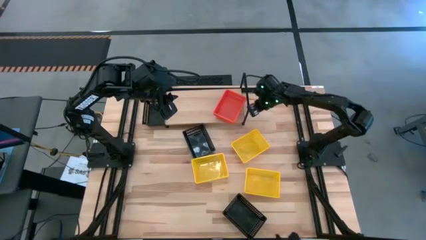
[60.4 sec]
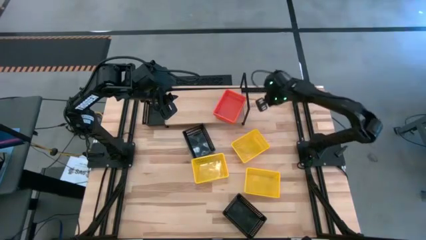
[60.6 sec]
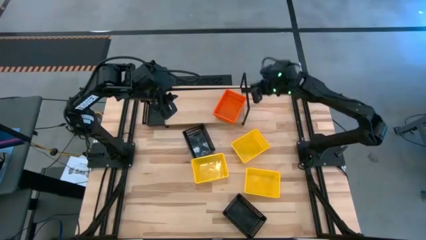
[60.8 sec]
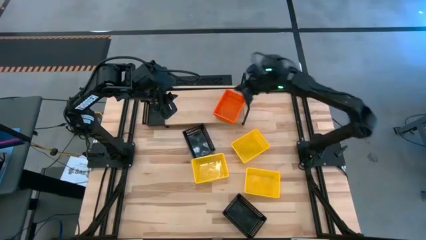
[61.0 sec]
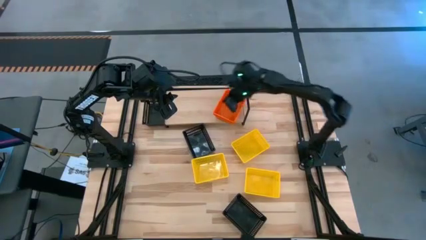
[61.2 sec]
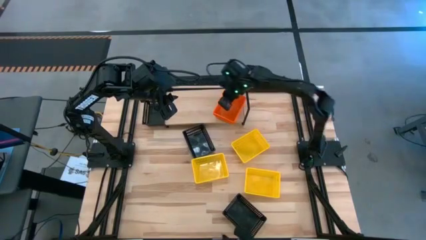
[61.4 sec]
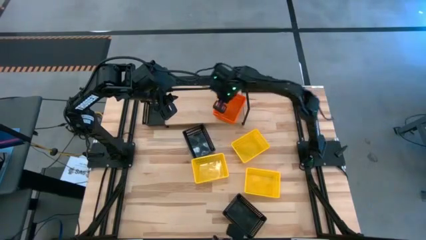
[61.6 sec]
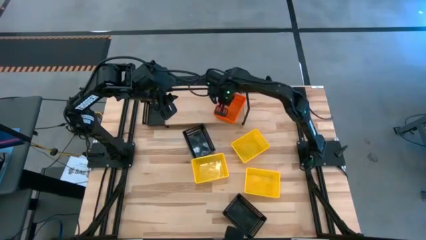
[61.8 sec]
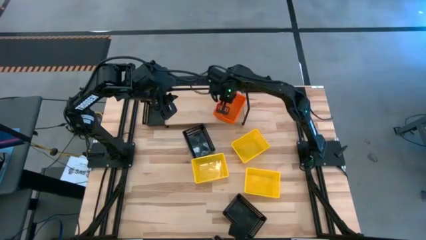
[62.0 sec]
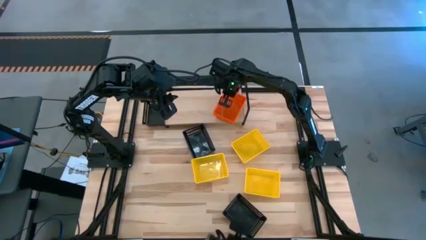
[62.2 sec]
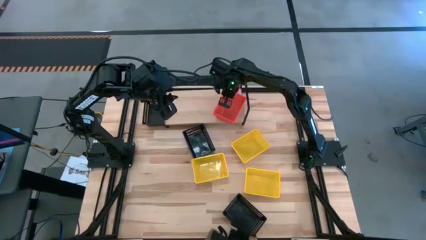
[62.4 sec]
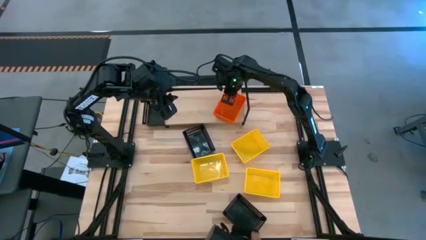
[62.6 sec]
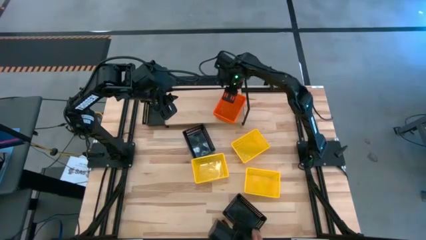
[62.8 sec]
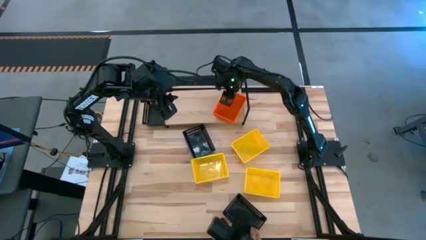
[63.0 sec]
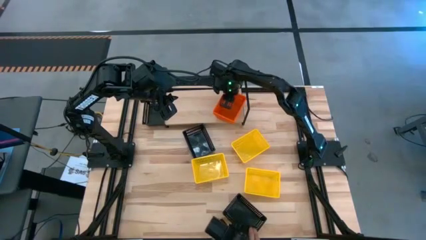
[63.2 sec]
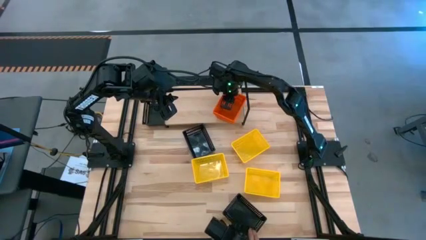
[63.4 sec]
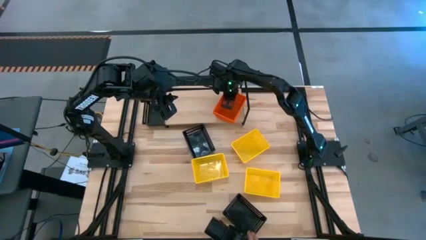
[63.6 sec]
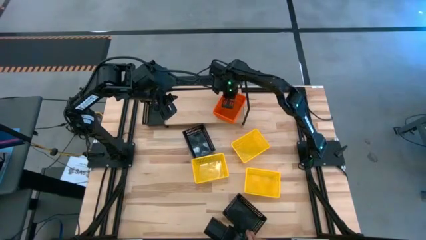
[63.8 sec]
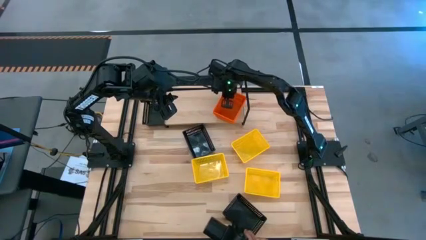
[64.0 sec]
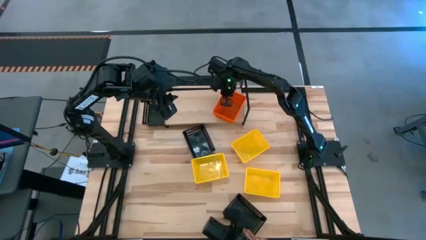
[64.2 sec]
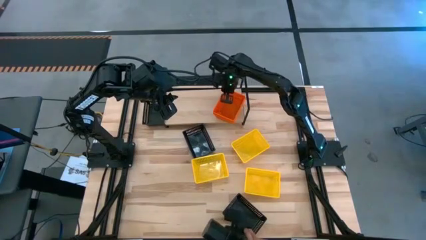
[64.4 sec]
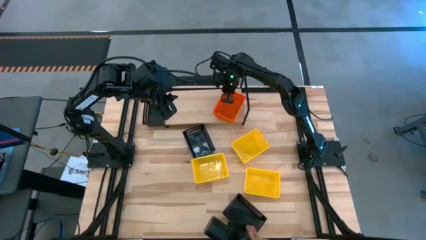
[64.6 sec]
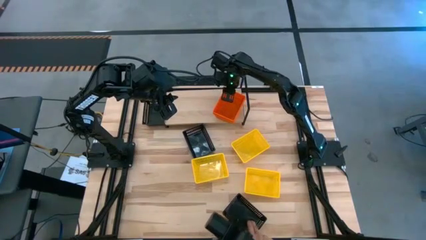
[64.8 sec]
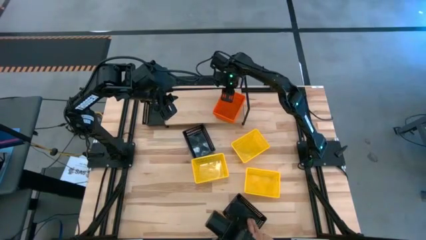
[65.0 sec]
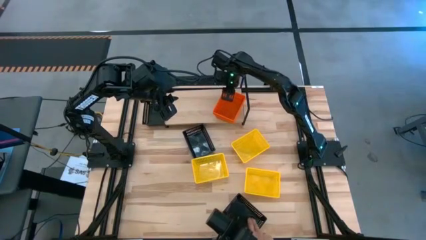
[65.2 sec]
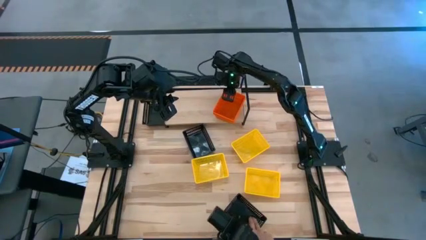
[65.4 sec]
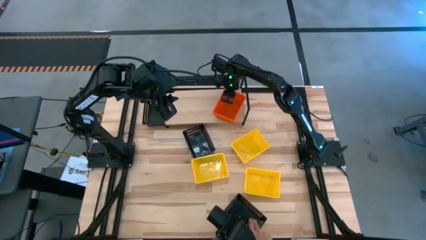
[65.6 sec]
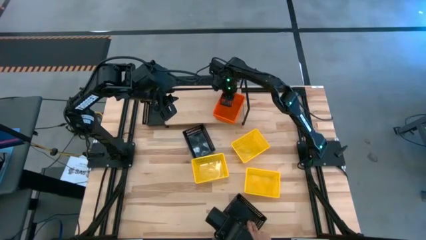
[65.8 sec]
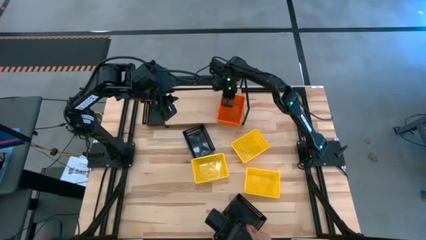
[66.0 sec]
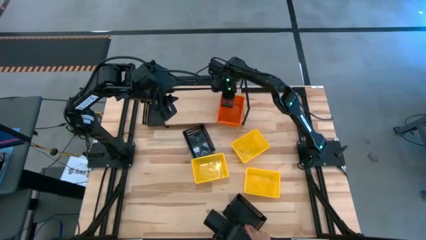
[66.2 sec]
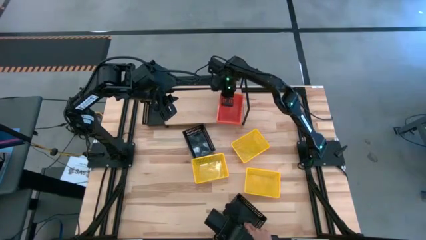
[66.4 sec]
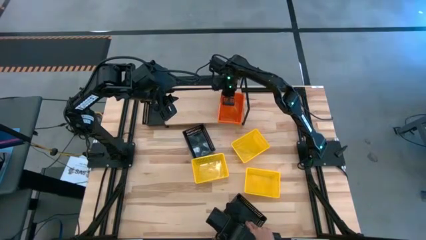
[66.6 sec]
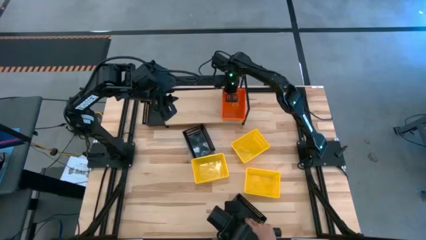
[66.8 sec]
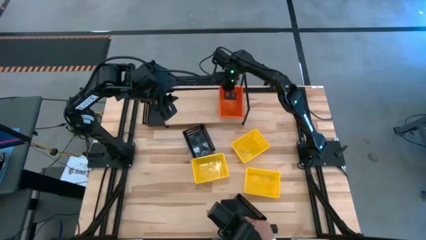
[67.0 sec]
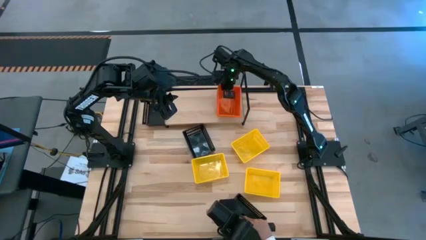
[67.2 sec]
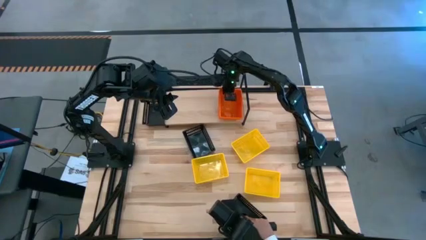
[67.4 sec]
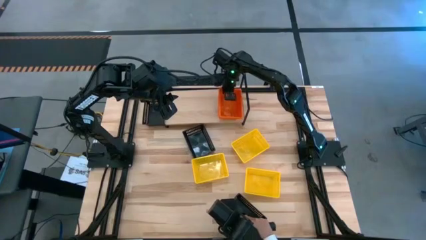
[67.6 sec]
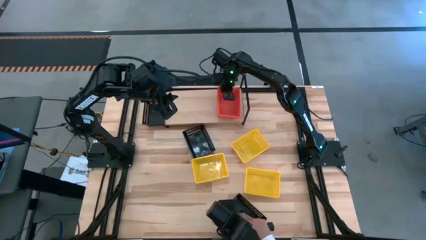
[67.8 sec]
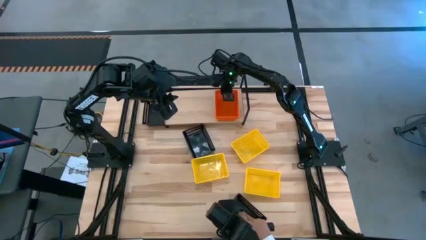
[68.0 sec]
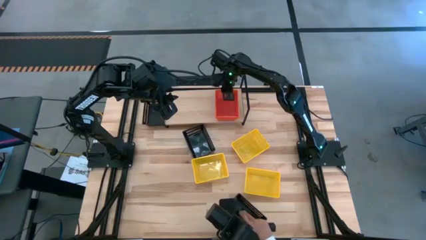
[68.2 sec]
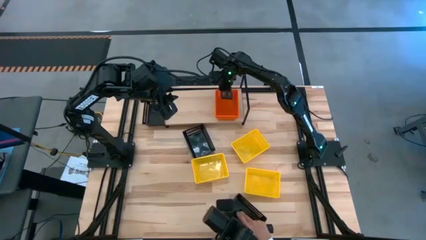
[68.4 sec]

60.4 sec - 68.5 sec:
Task: Stack baskets on shelf by color
Adjust the orange bin on the shelf

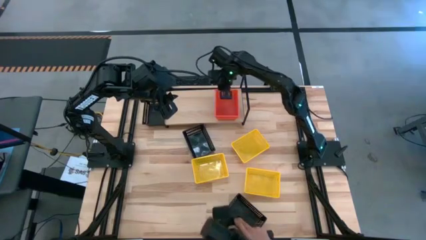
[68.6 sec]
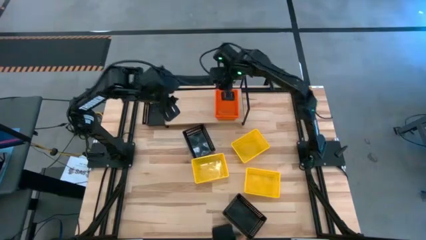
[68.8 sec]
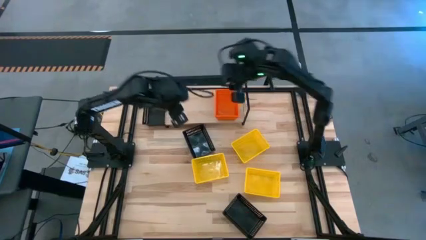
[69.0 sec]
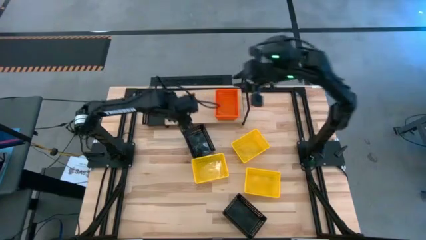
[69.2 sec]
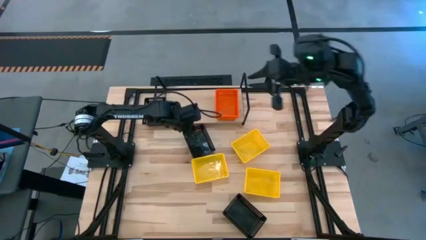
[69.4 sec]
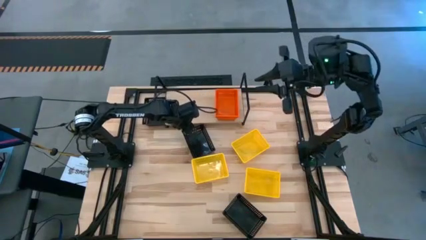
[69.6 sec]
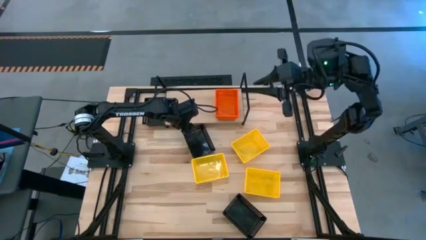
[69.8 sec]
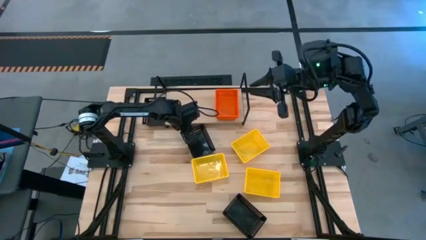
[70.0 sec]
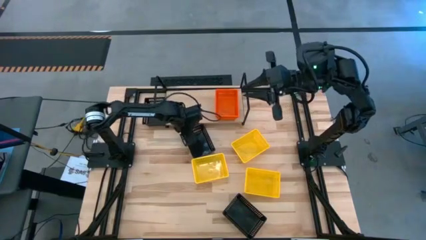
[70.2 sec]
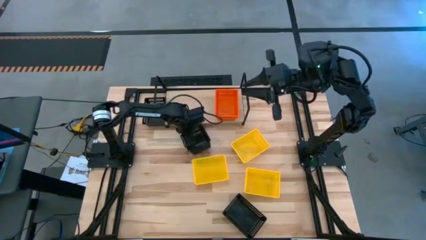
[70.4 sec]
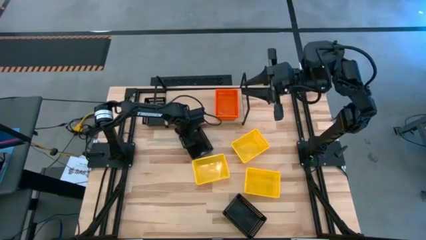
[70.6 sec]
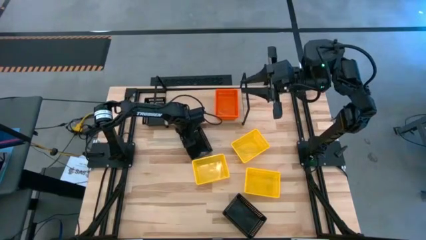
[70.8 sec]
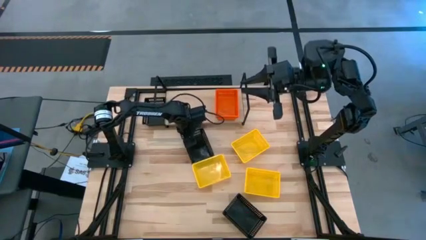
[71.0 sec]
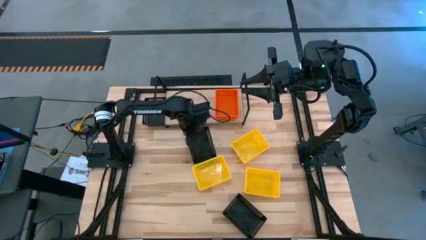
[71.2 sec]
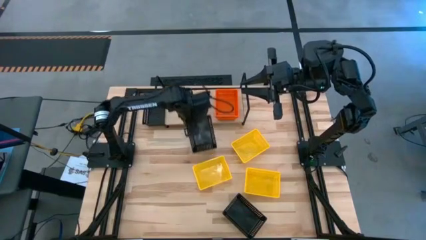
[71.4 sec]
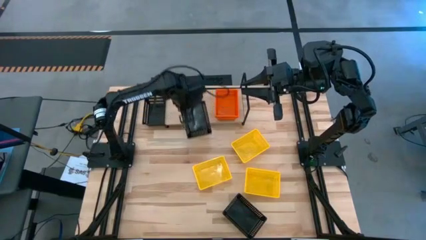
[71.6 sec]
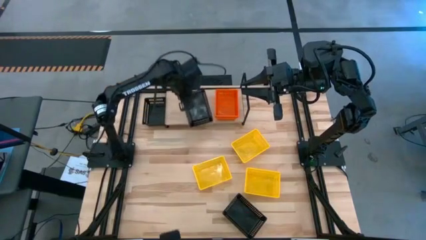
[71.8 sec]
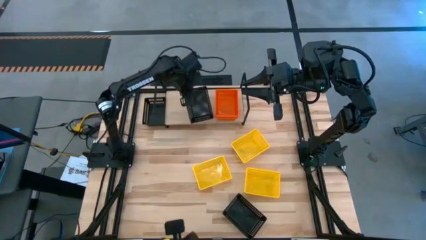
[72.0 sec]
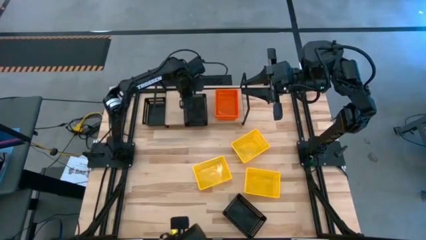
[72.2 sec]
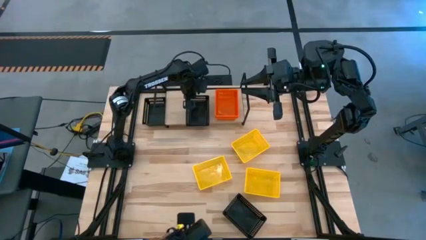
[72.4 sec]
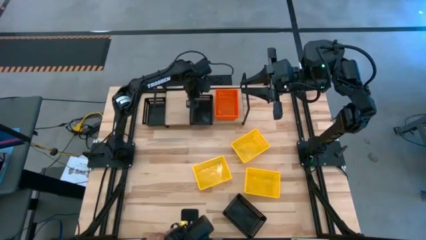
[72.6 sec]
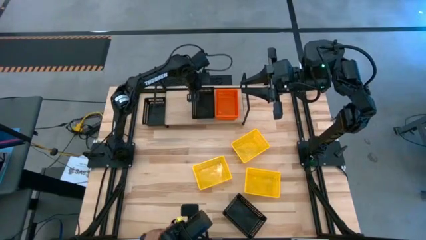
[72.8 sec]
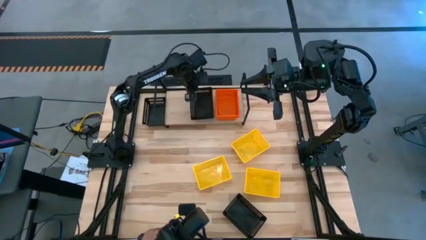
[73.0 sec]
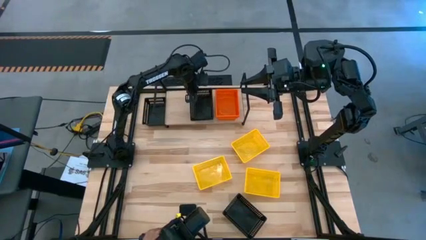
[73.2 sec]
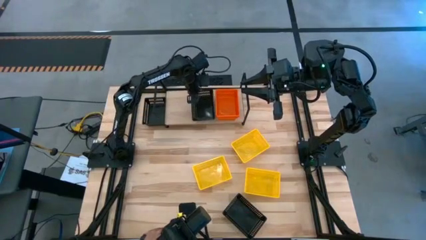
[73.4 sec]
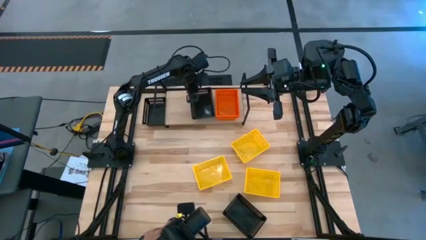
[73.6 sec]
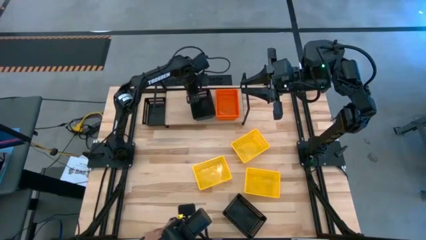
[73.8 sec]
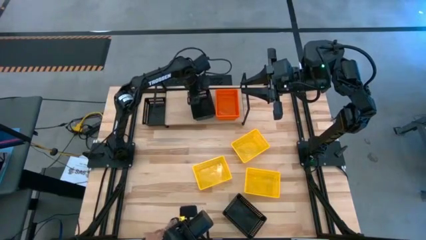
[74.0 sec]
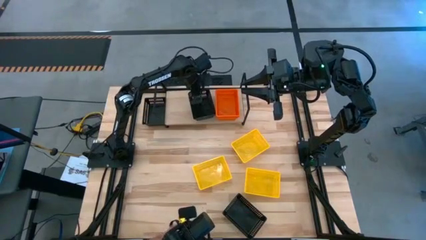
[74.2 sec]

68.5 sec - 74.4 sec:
Put the middle black bin on the shelf
